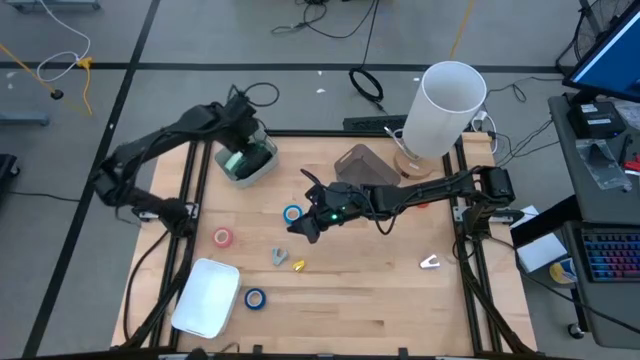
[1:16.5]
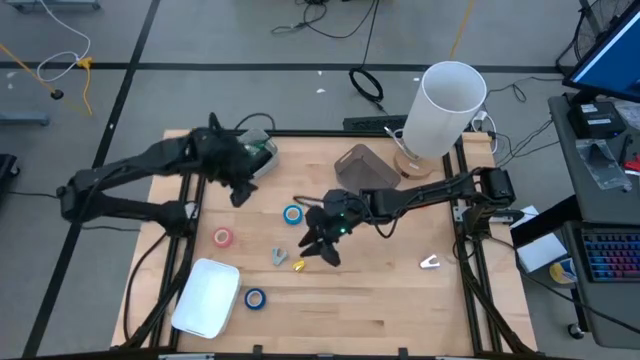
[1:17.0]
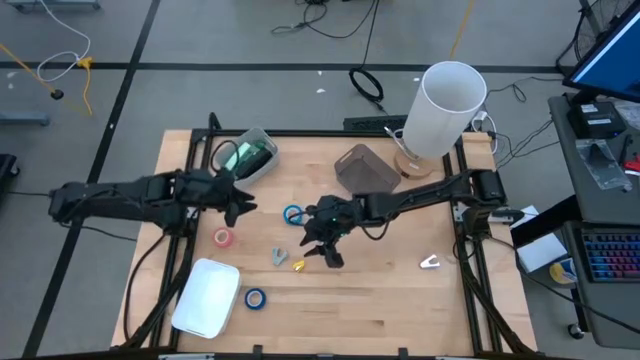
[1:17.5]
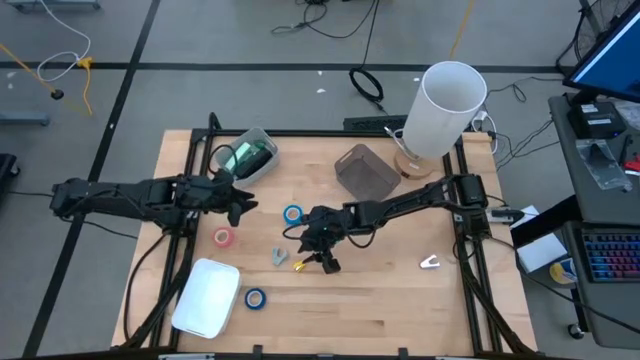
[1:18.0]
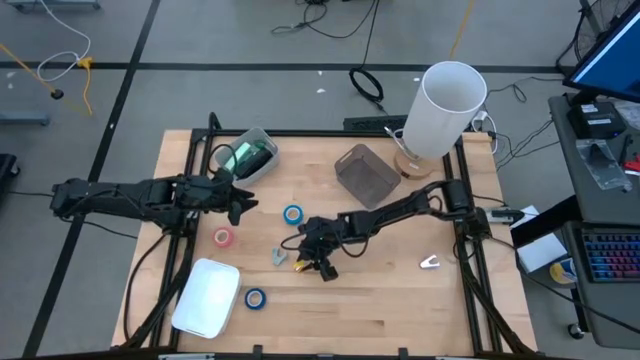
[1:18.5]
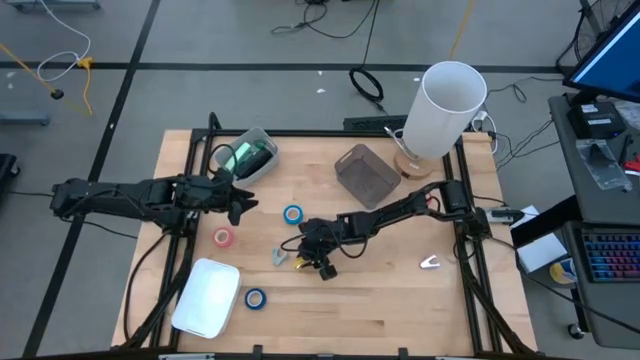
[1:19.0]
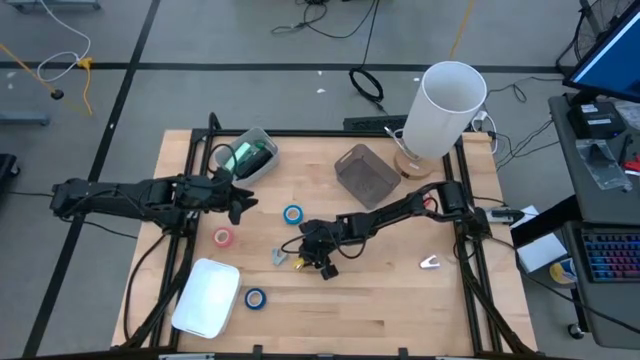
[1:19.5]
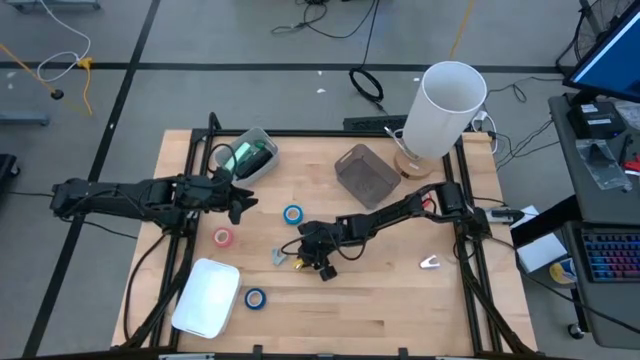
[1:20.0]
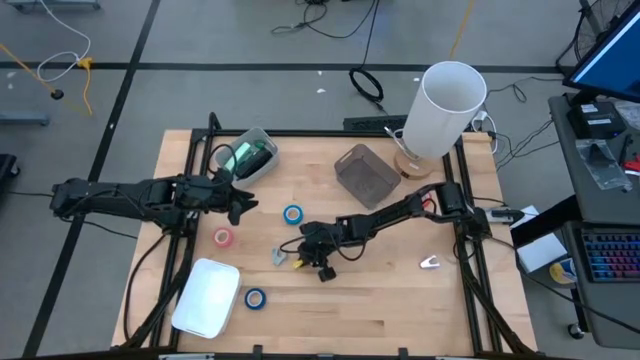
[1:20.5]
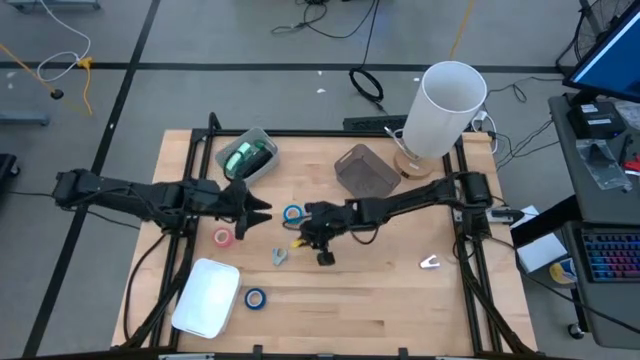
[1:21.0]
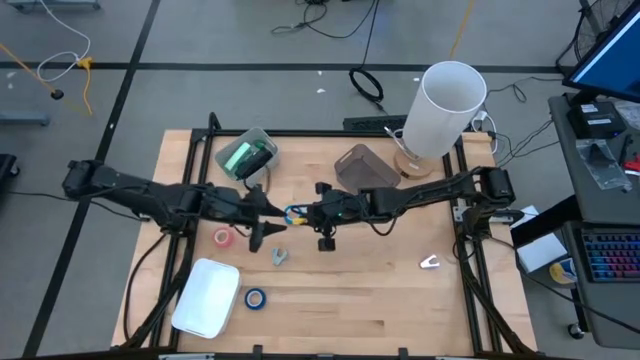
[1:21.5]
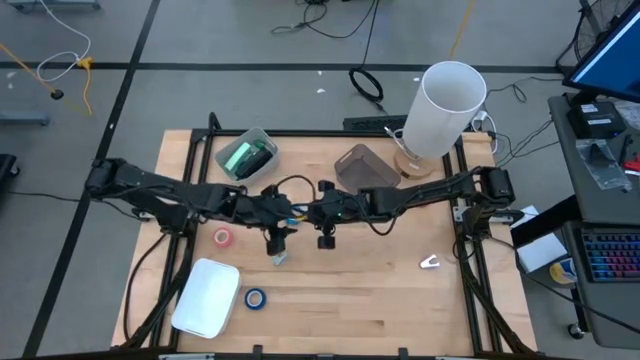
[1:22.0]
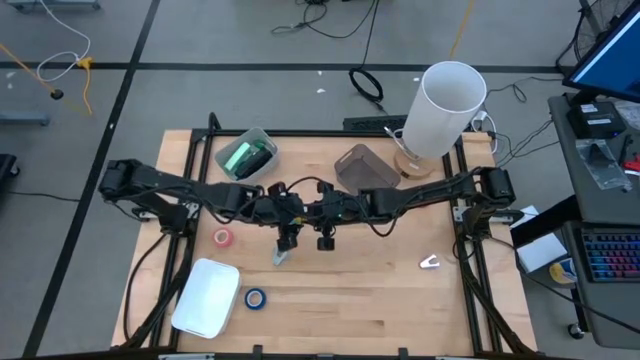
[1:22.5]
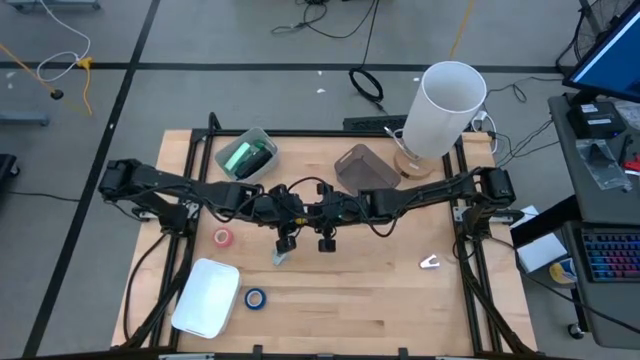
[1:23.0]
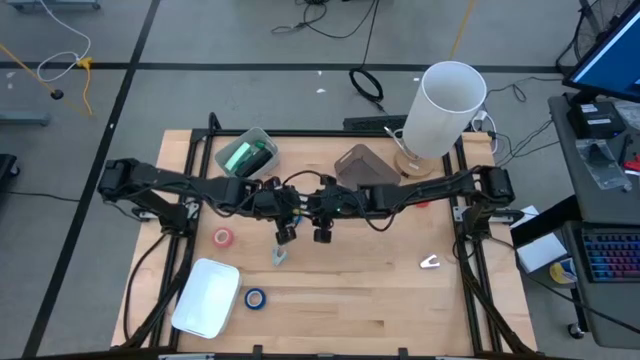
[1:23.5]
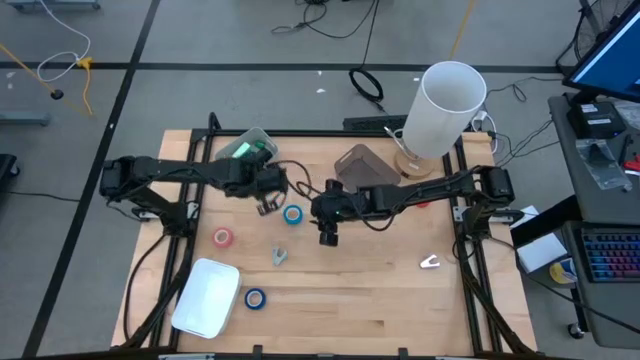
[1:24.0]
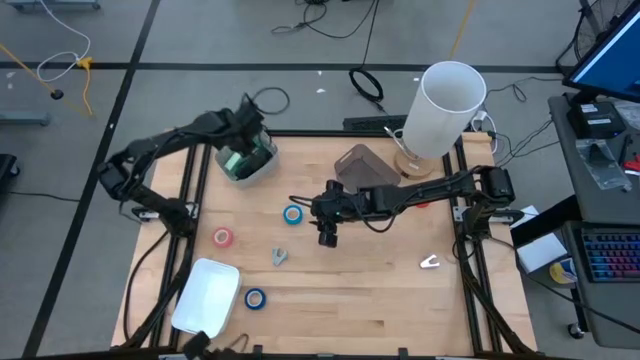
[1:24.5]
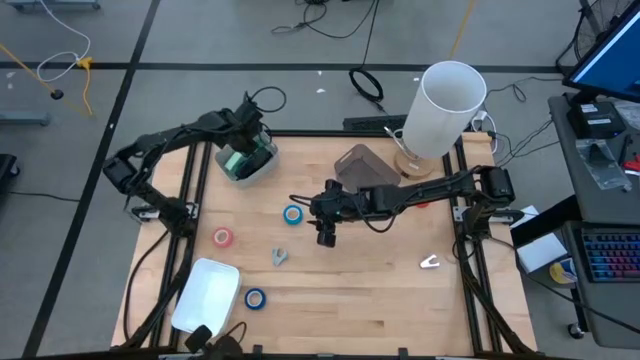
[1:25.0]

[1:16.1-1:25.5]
Task: Pick and place Stapler, Stapler remover, tape
Put the yellow stapler into the gray bin

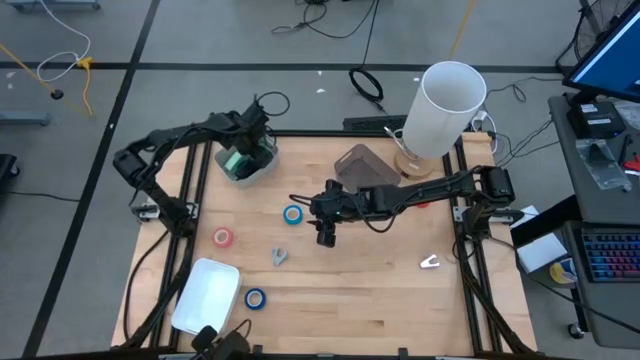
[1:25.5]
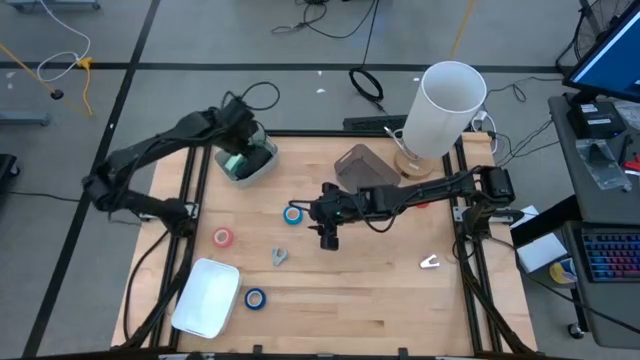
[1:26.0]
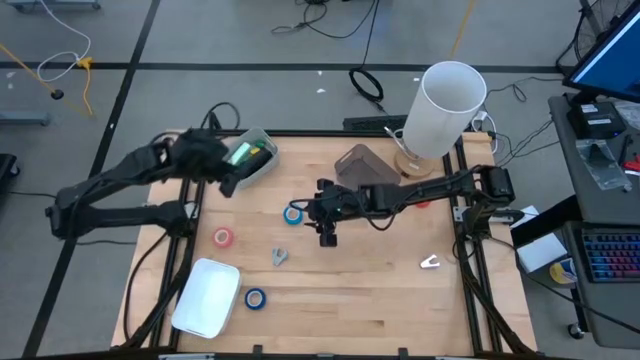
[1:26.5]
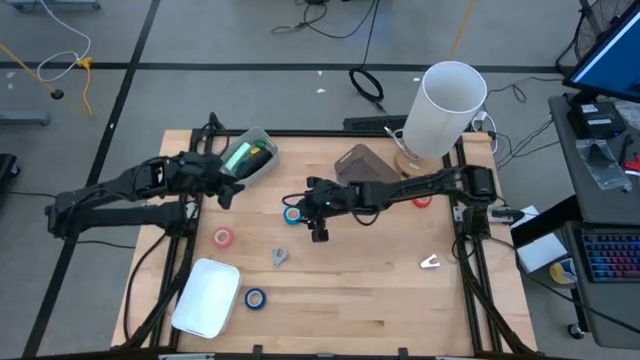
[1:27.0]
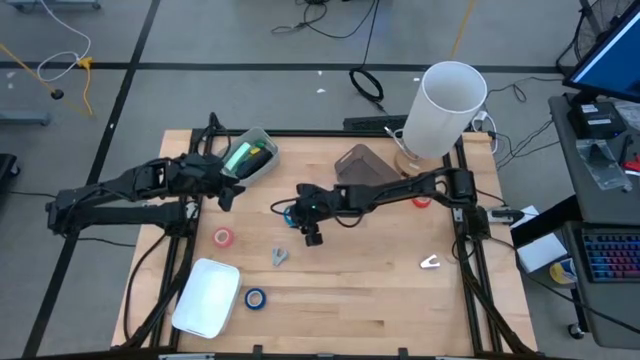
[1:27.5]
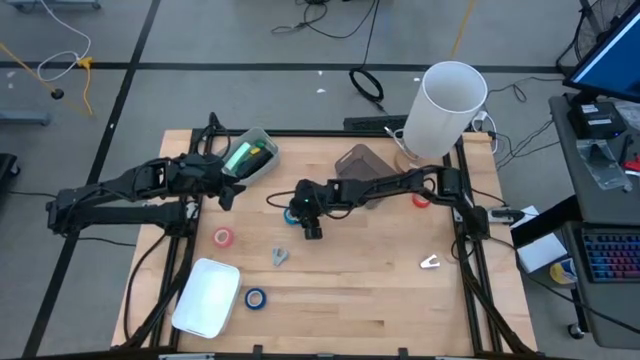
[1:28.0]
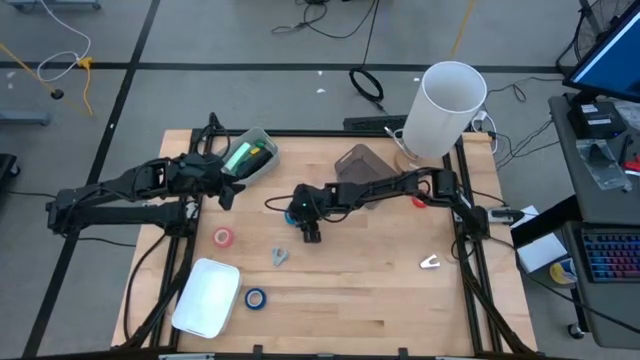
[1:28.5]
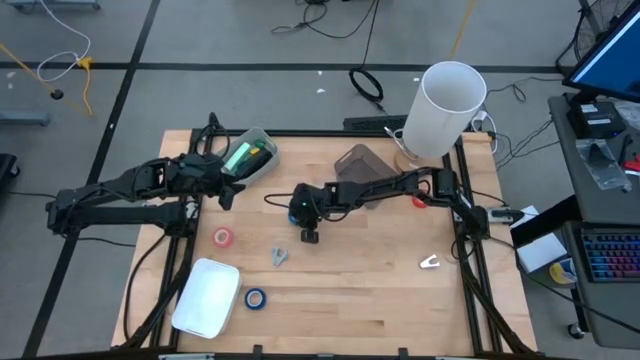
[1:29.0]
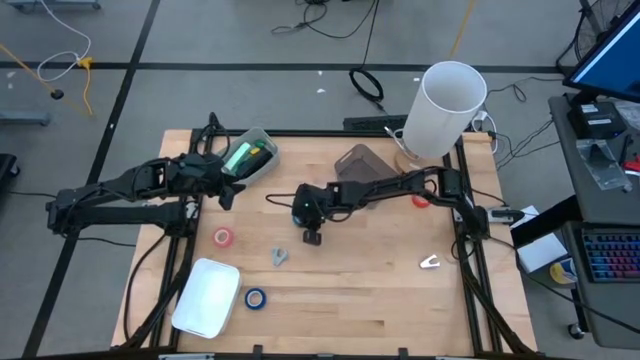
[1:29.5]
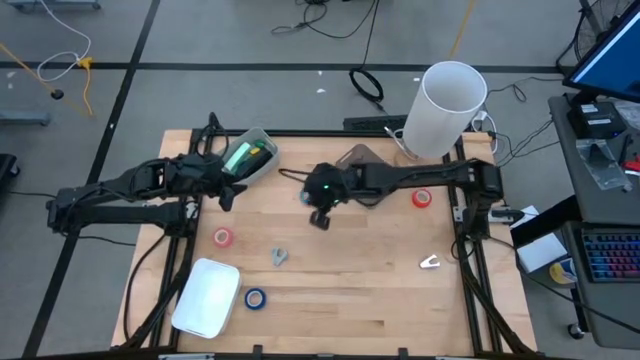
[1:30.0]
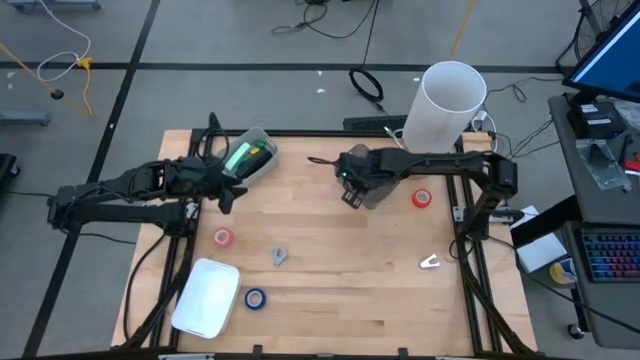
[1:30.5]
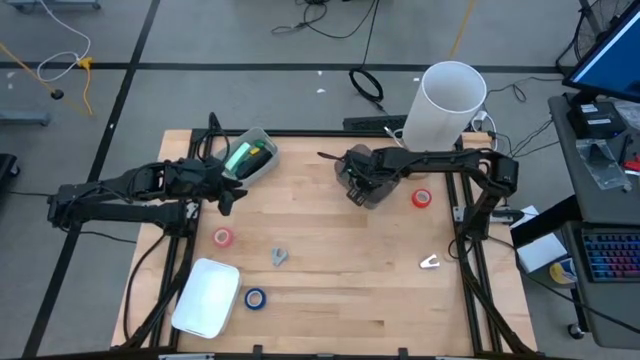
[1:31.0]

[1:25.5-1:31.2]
Put the light blue tape into the black bin

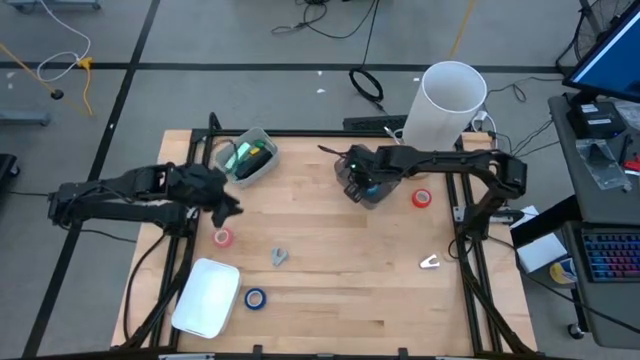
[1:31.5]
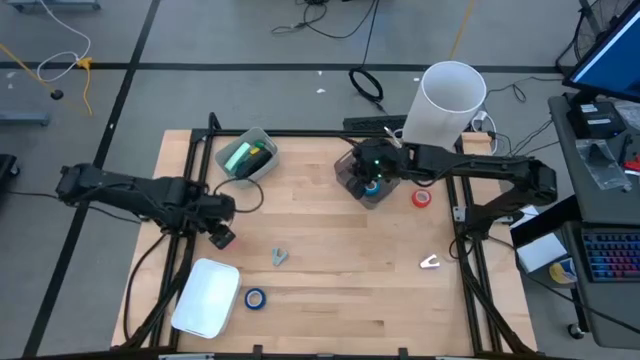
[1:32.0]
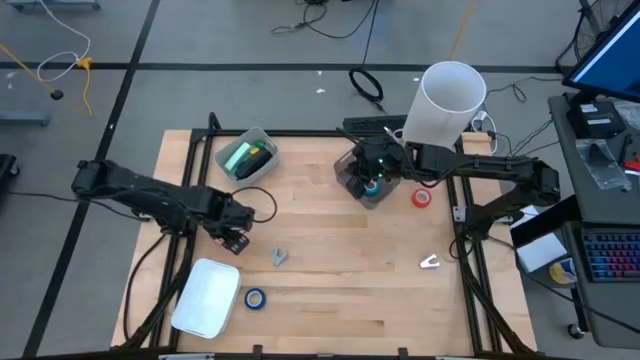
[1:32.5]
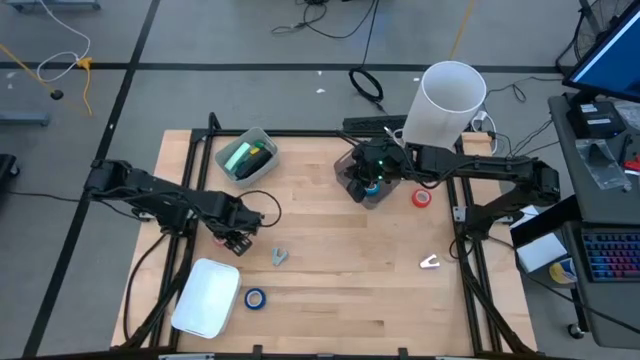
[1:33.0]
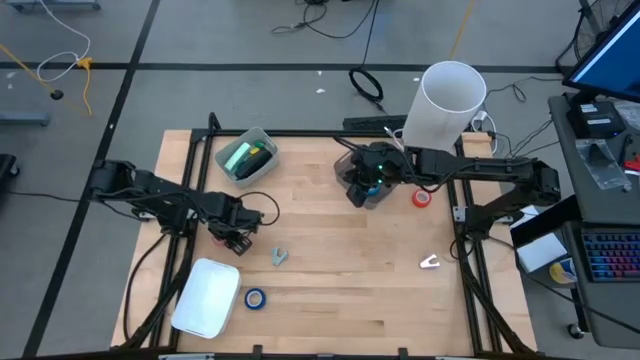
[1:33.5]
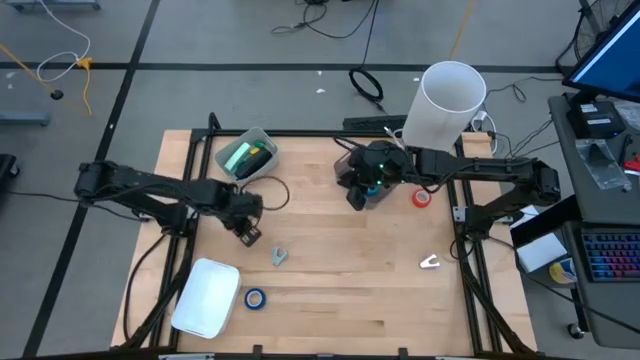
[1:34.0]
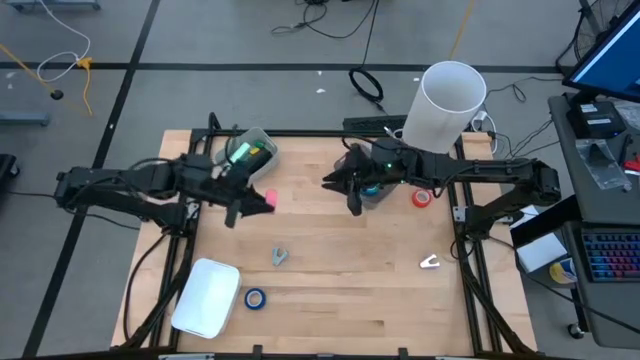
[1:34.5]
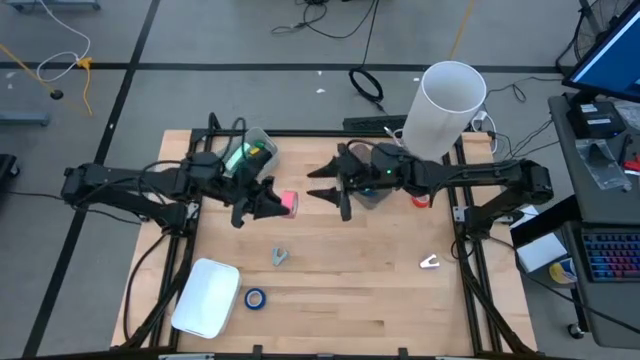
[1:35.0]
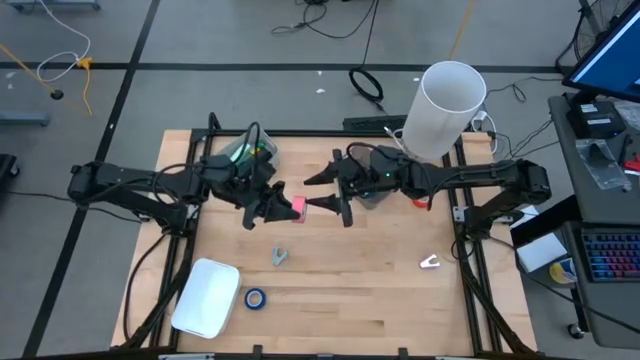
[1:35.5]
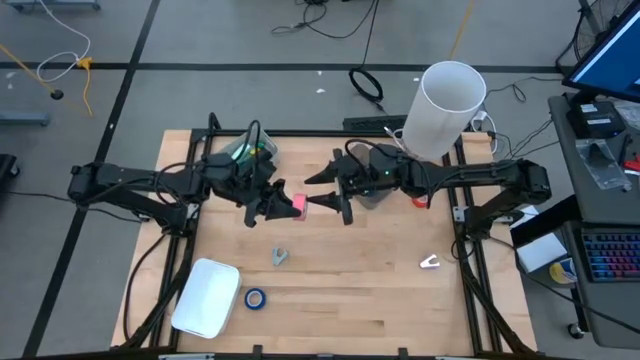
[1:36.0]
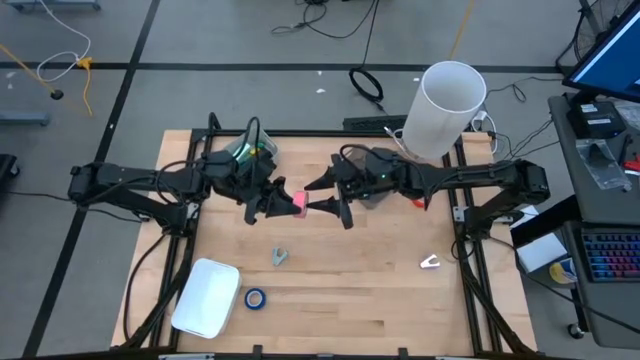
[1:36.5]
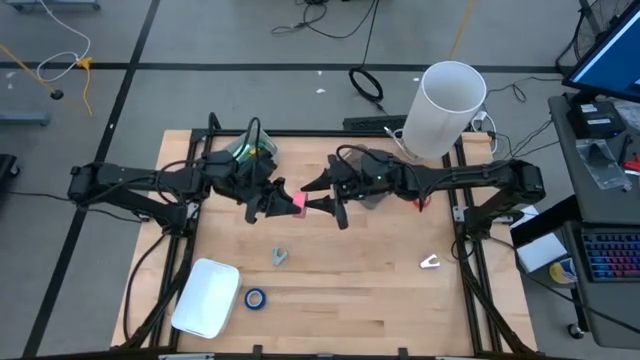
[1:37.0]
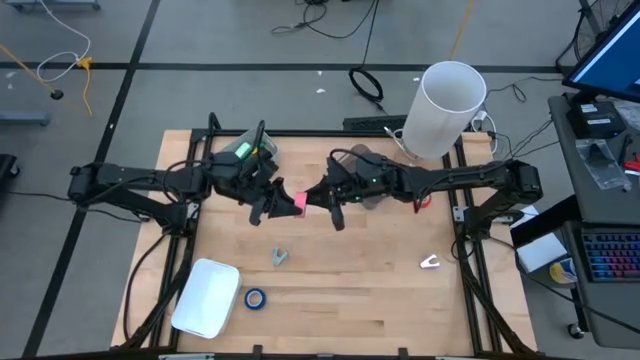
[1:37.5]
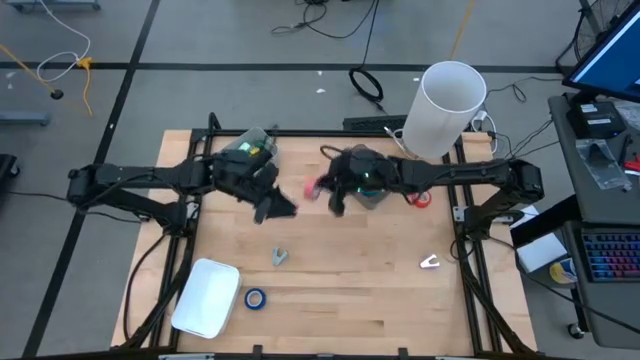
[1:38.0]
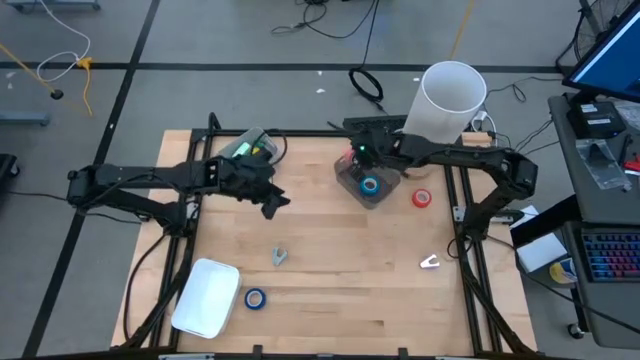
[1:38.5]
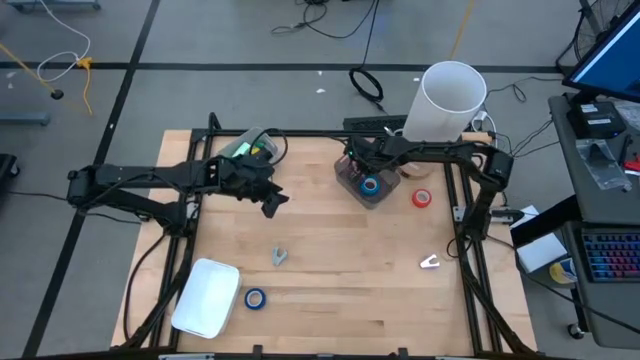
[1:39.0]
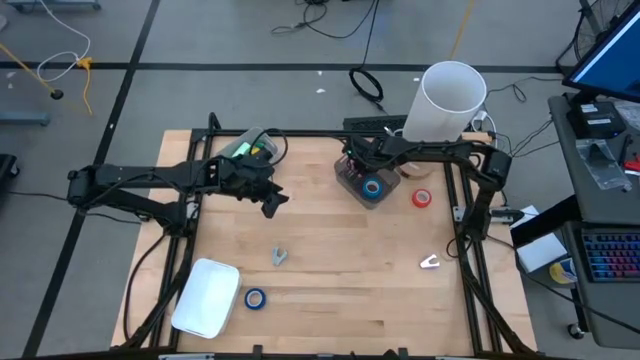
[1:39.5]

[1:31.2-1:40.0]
Put the pink tape into the black bin
